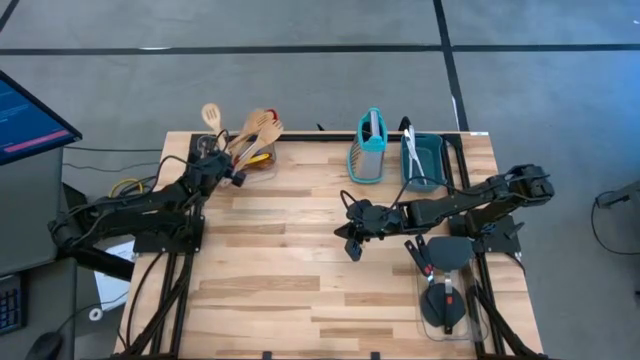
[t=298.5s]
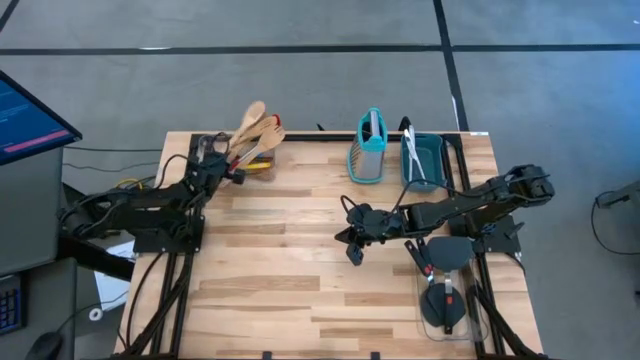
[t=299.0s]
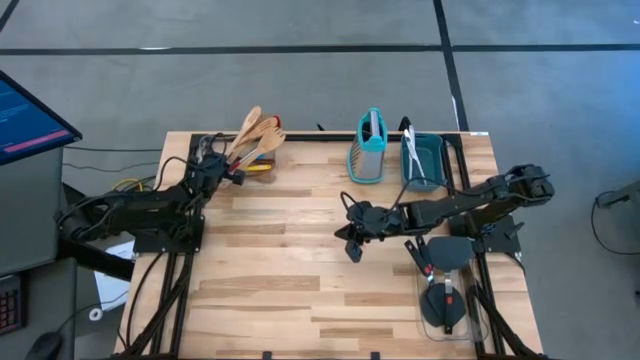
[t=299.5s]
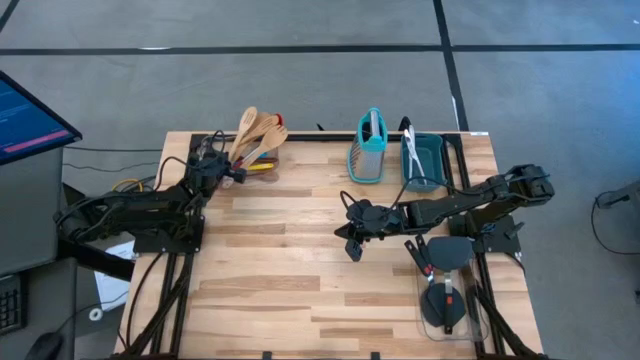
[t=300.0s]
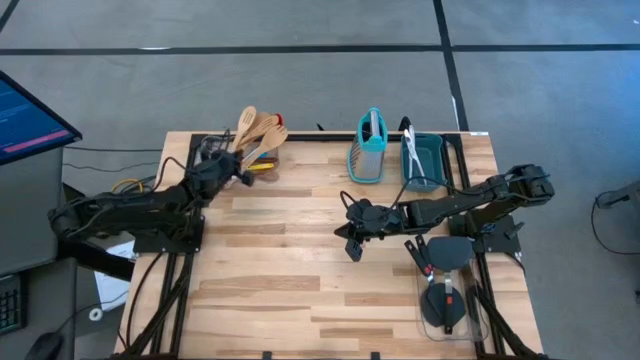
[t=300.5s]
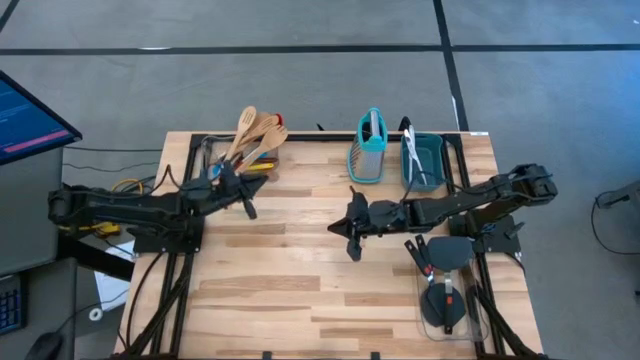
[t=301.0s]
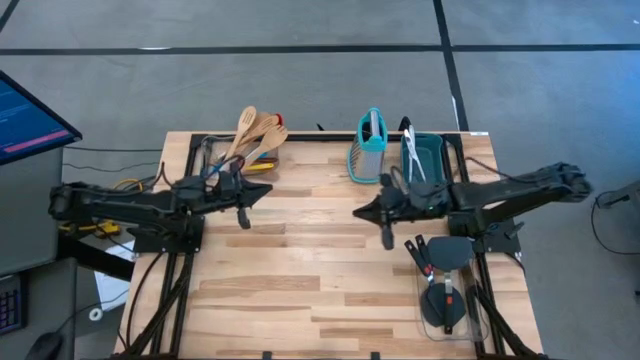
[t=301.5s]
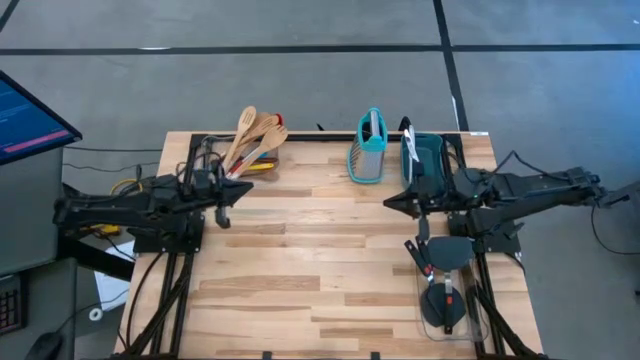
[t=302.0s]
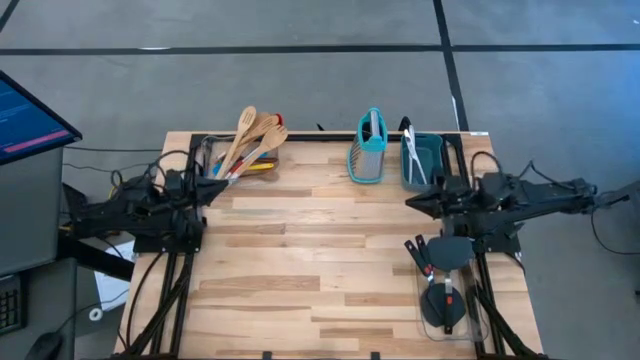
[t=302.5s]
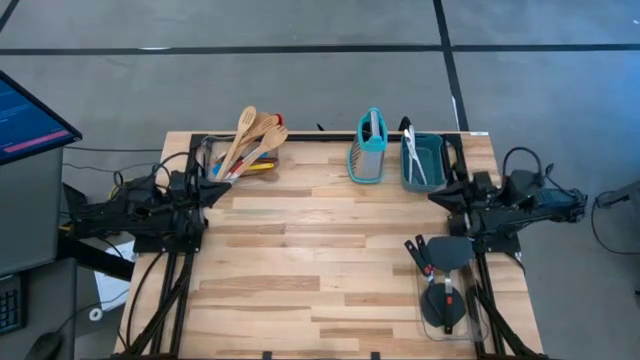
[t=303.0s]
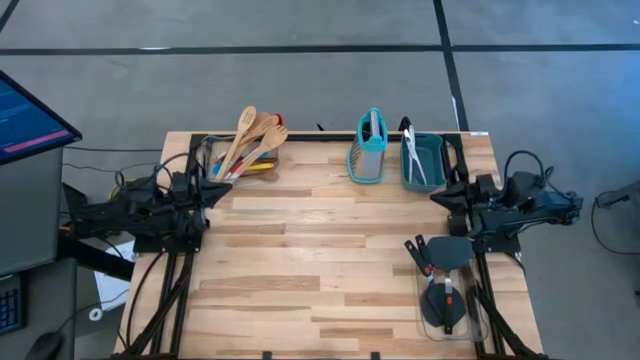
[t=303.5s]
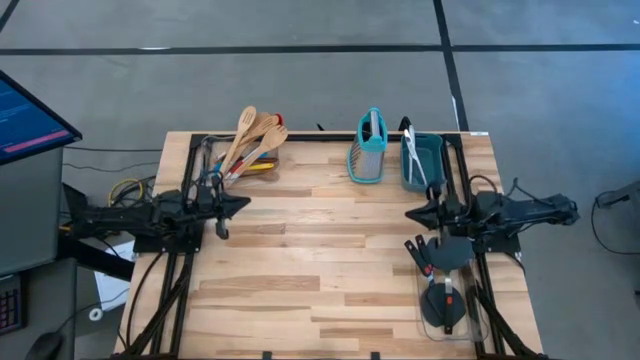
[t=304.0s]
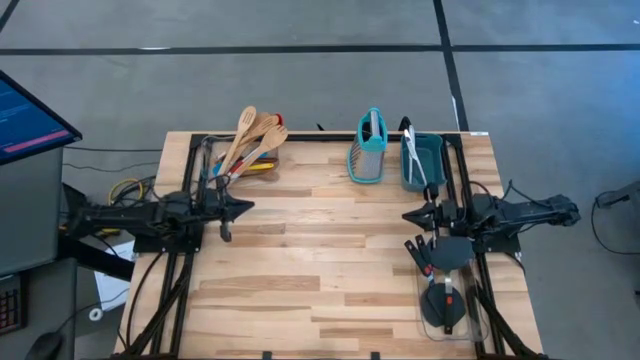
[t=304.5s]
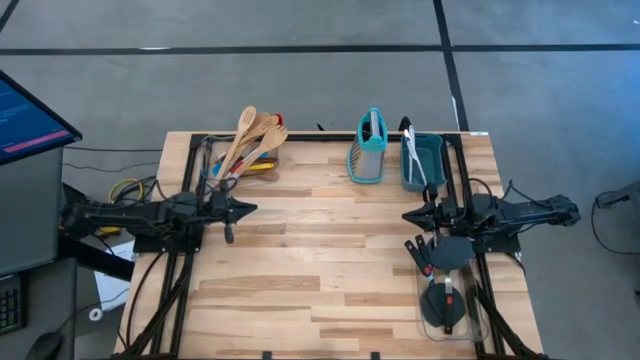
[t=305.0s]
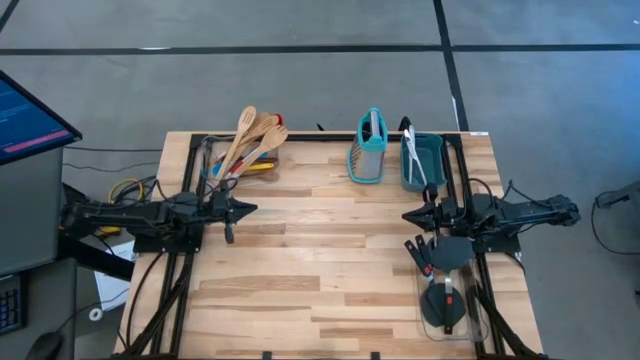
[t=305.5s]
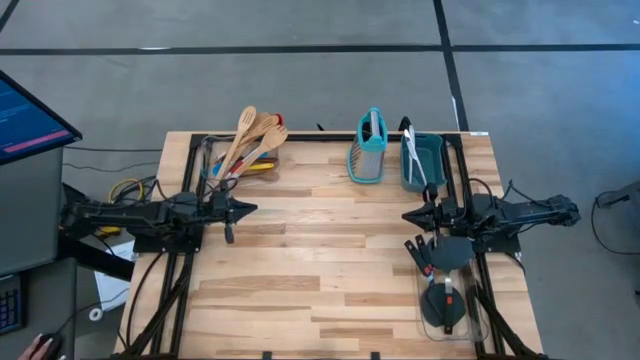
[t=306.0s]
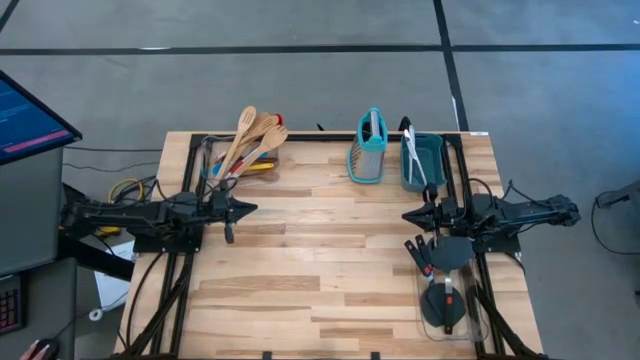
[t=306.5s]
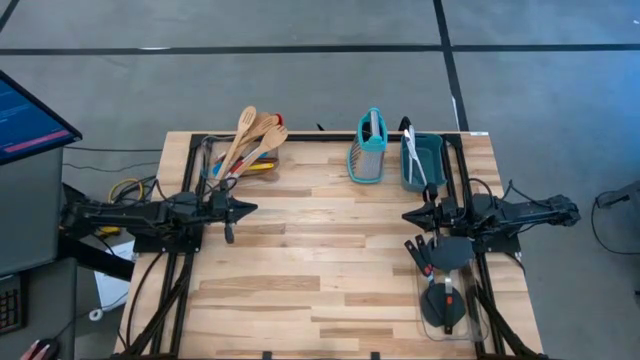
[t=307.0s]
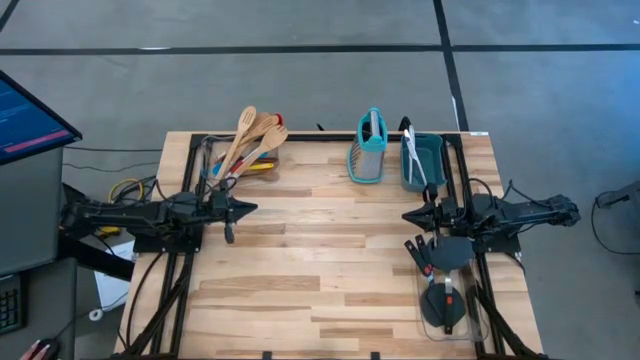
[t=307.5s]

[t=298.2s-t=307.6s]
Task: Pick & Place Kitchen Items
Return to Home Position

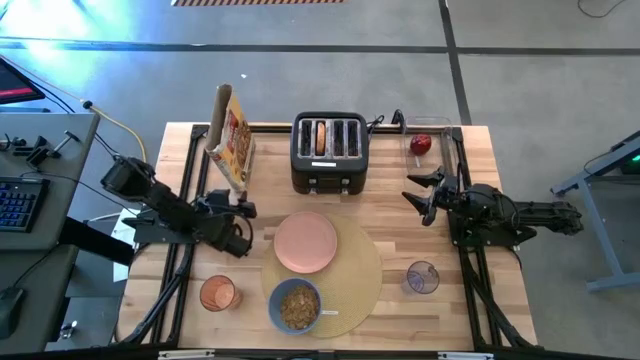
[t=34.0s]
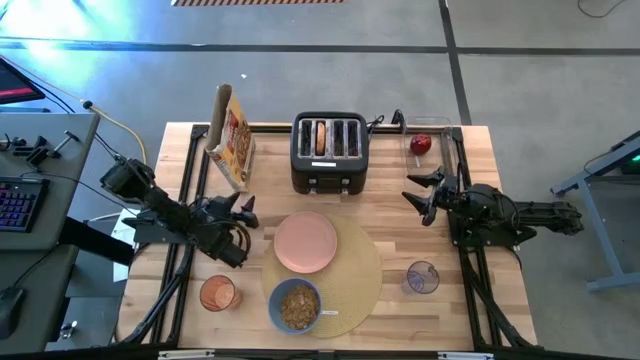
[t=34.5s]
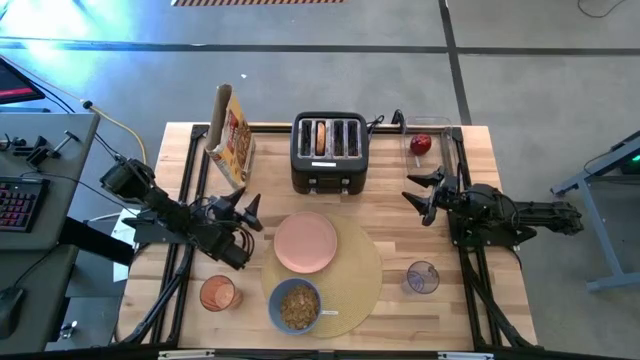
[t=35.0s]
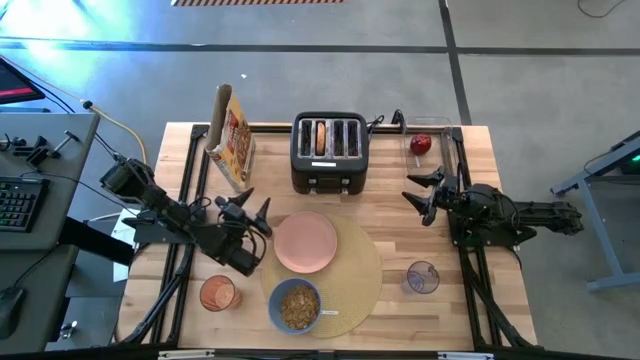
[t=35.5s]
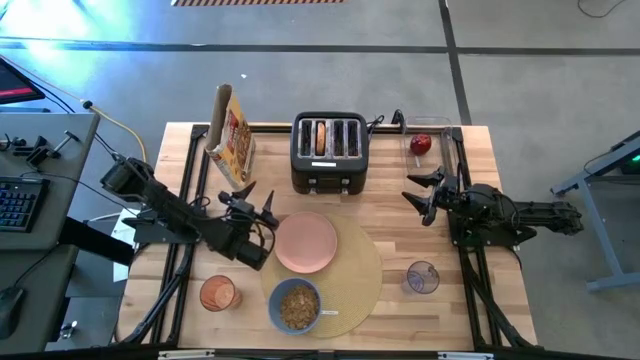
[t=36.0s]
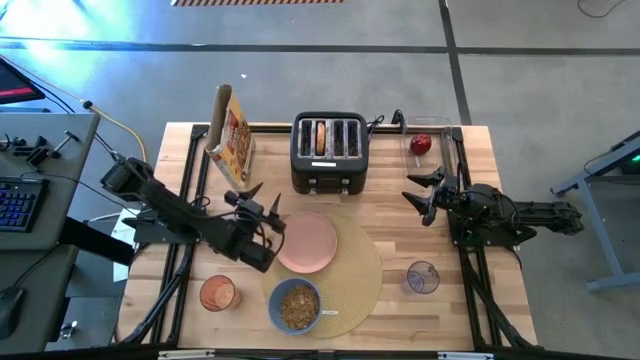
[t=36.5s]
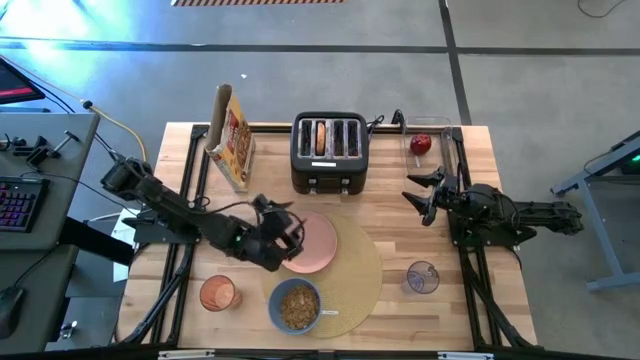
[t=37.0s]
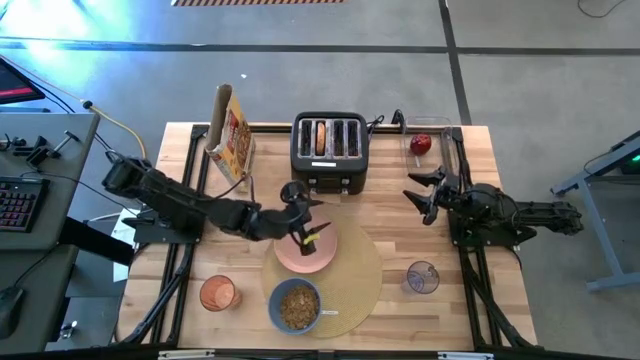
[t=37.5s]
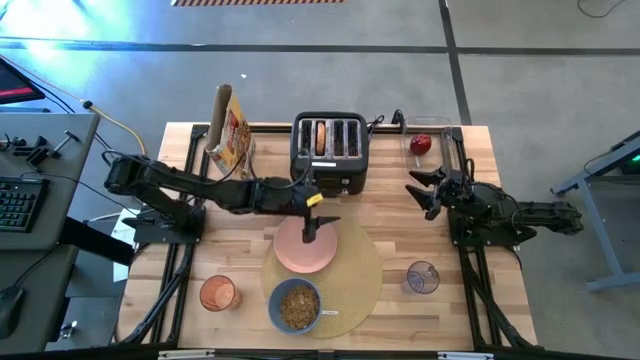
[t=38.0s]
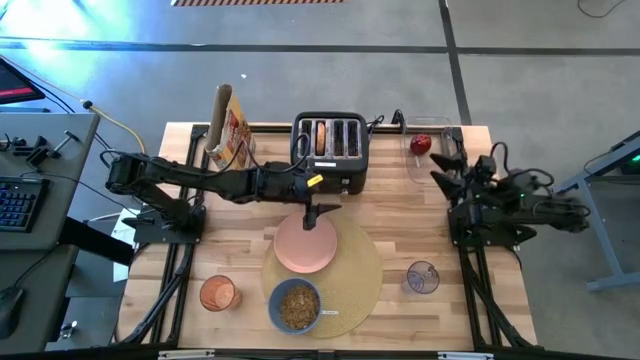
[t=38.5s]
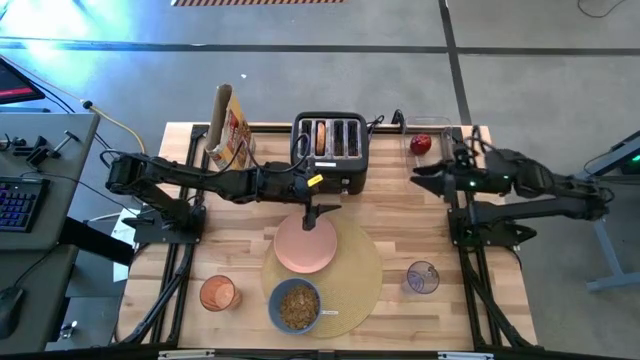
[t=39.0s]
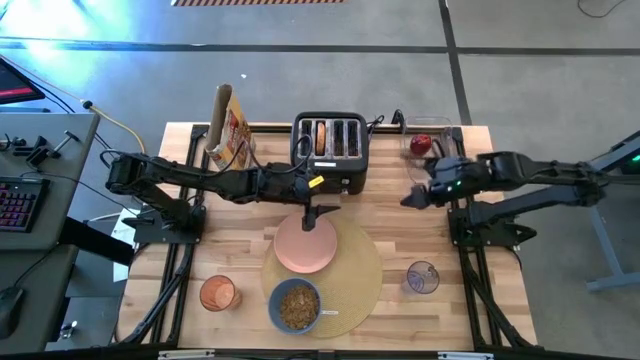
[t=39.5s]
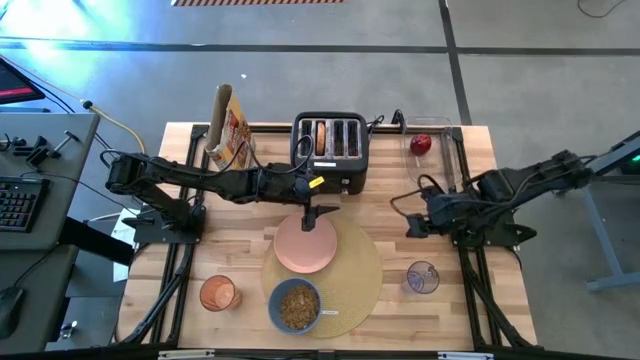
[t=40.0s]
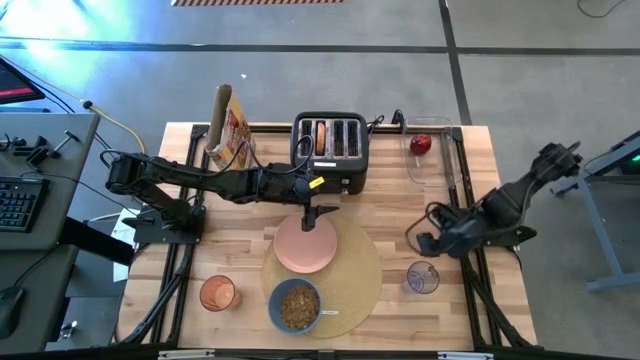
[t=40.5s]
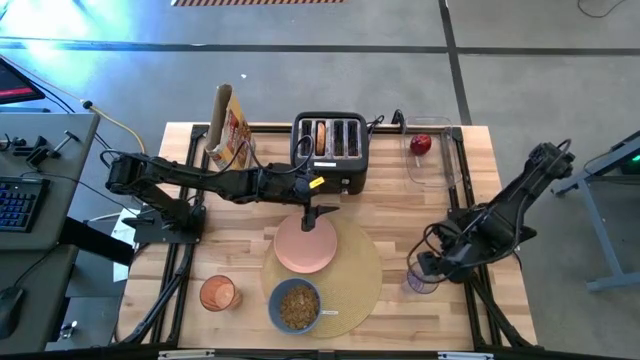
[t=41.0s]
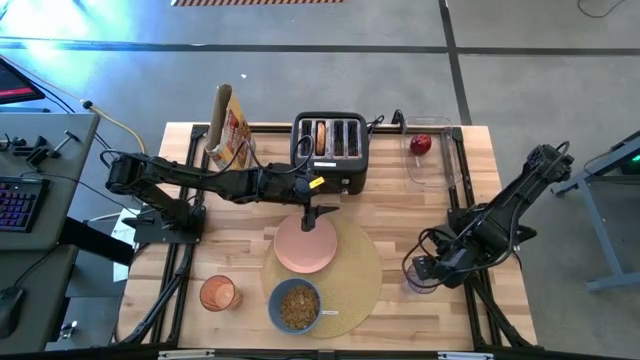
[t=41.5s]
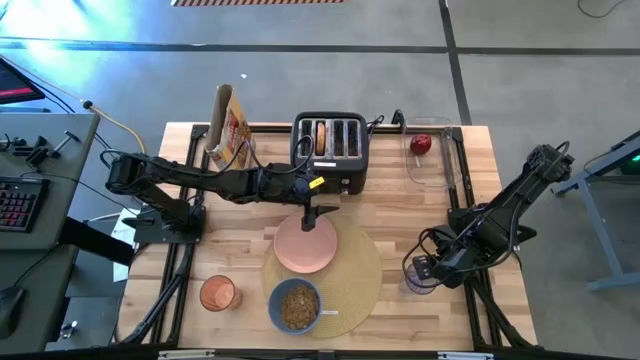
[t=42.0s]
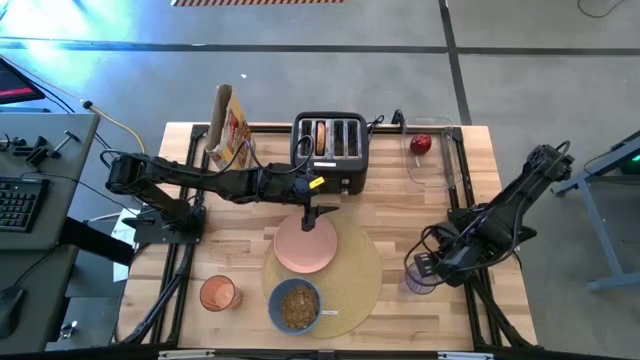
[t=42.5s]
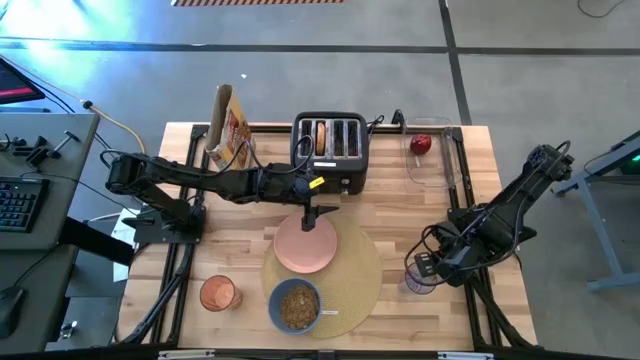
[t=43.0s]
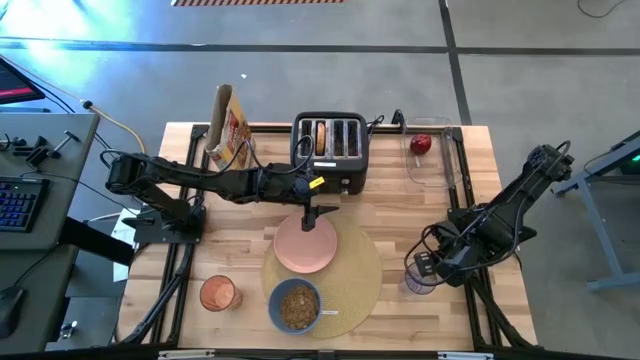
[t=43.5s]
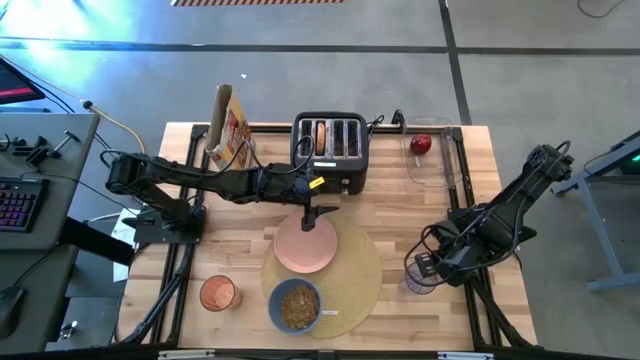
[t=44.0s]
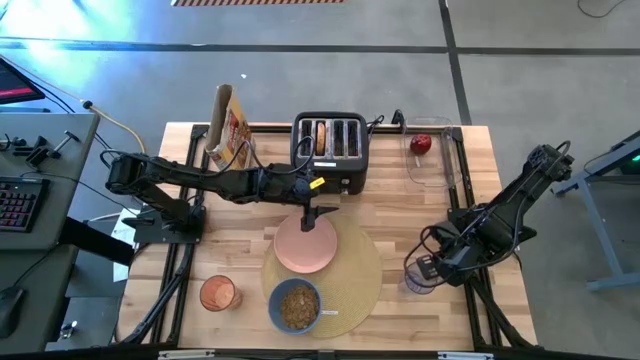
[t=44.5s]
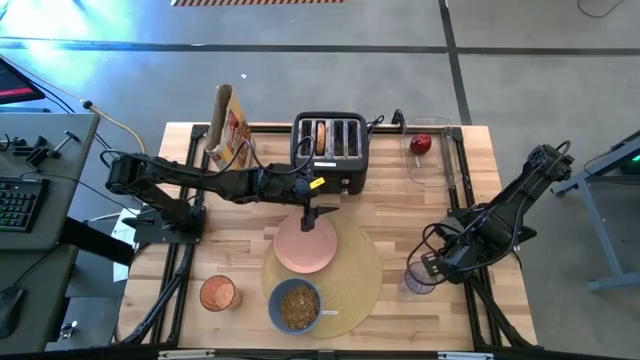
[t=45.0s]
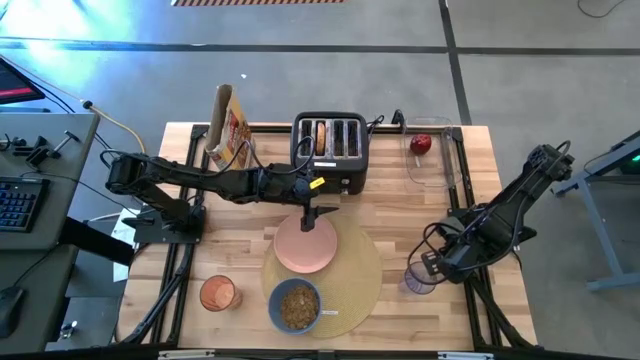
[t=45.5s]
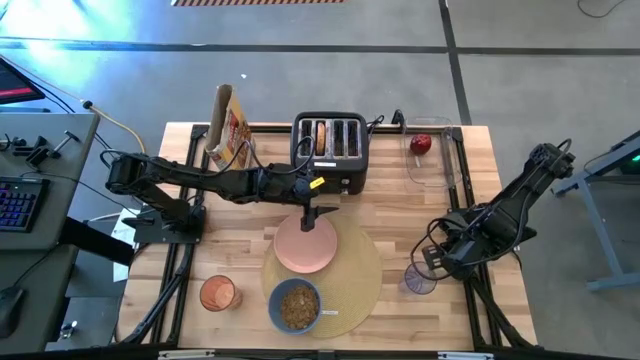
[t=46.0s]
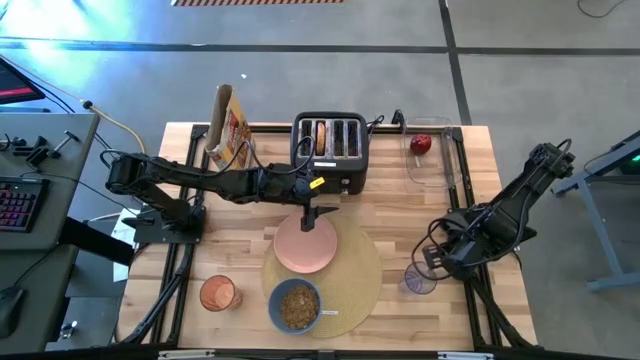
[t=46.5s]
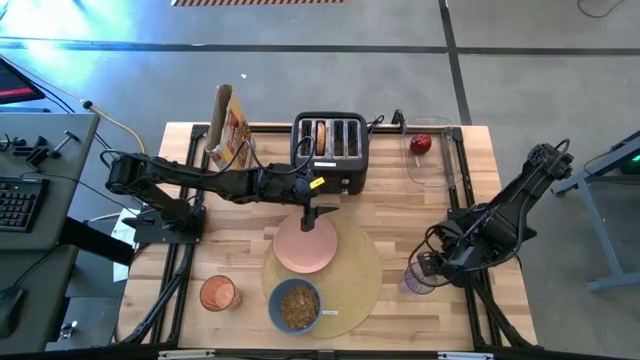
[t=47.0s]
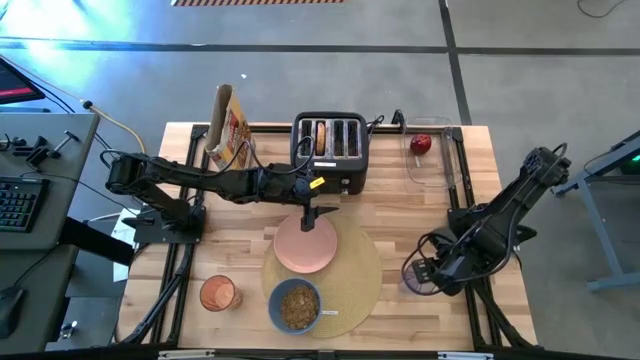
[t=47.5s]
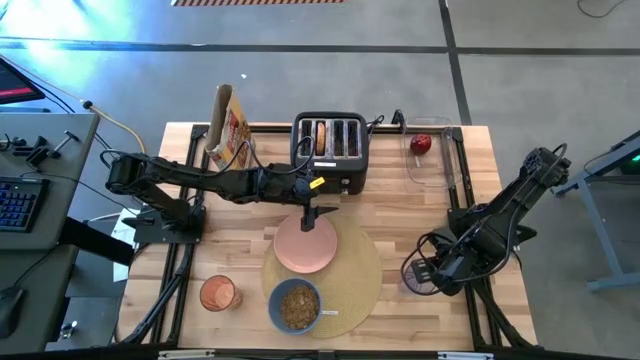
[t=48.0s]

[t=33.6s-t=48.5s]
Task: Arrange a breakfast setting
Put the spoon on the bottom right of the place mat
